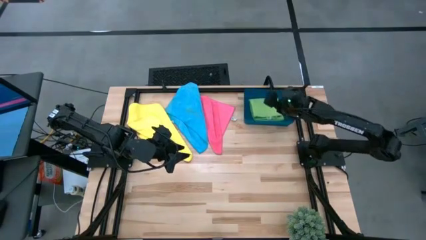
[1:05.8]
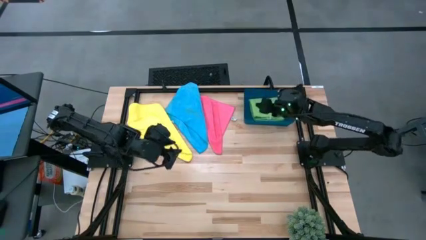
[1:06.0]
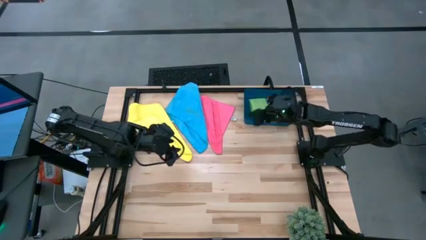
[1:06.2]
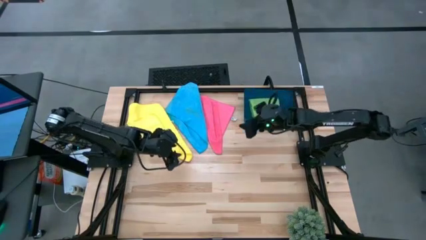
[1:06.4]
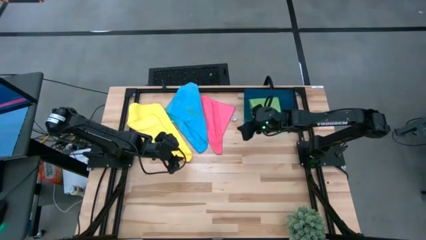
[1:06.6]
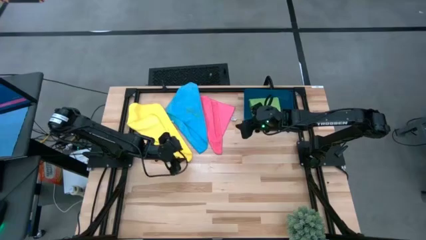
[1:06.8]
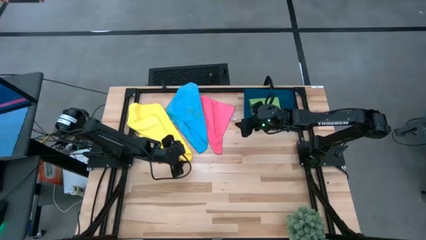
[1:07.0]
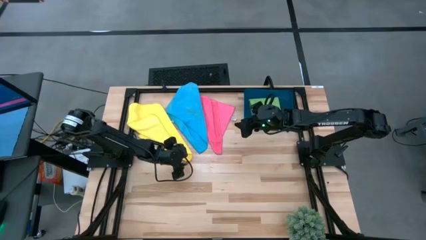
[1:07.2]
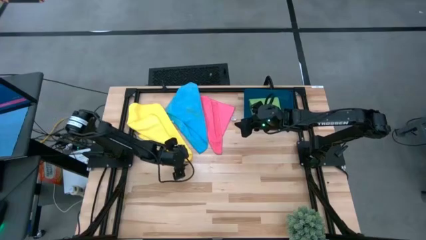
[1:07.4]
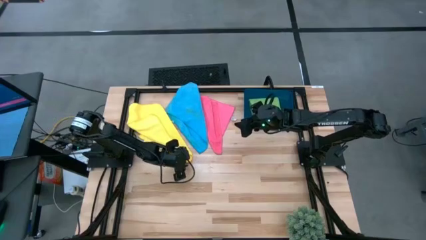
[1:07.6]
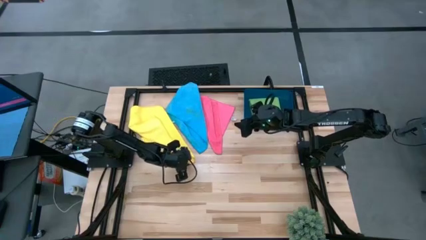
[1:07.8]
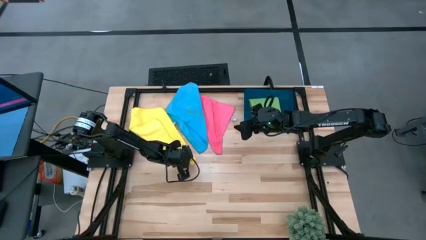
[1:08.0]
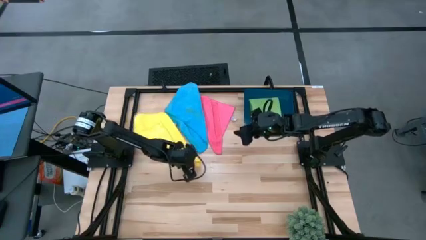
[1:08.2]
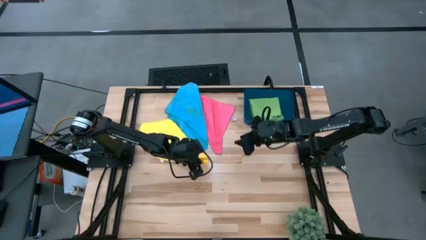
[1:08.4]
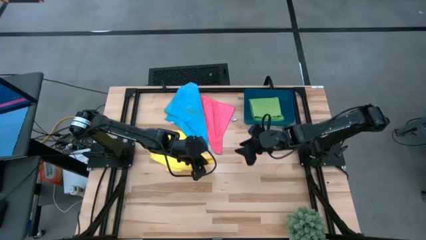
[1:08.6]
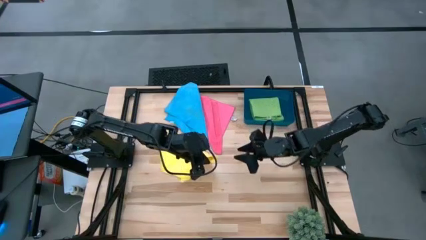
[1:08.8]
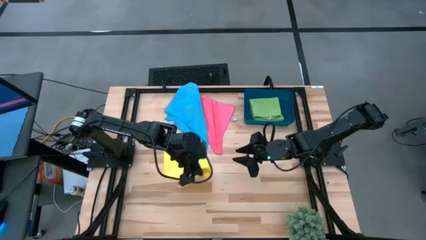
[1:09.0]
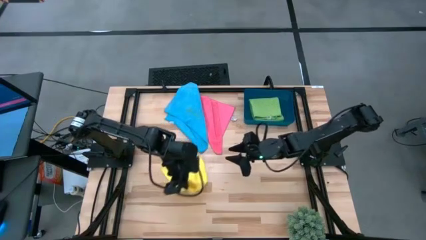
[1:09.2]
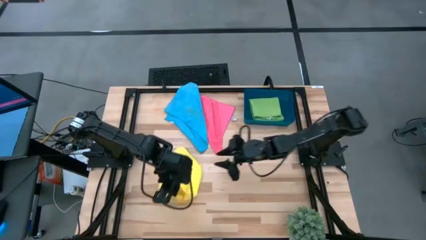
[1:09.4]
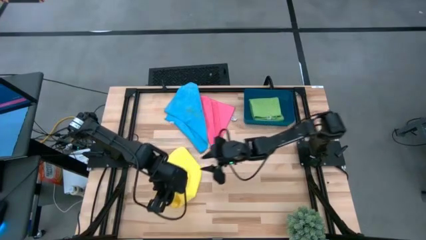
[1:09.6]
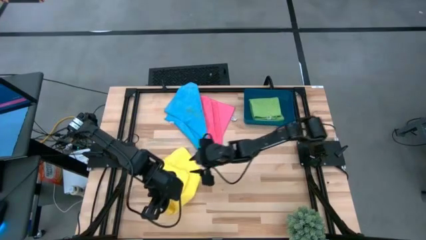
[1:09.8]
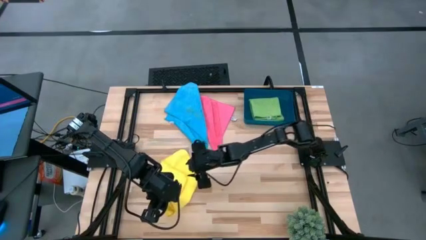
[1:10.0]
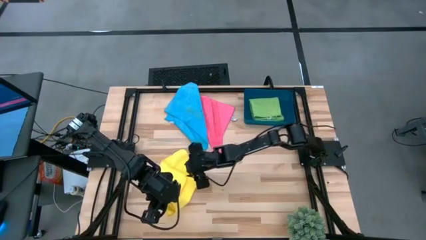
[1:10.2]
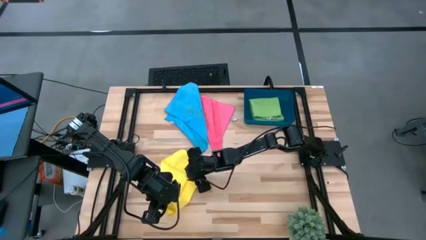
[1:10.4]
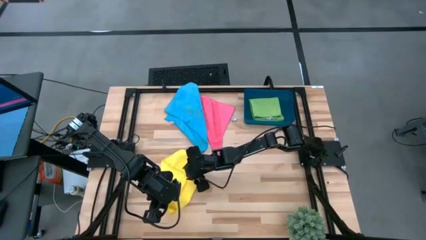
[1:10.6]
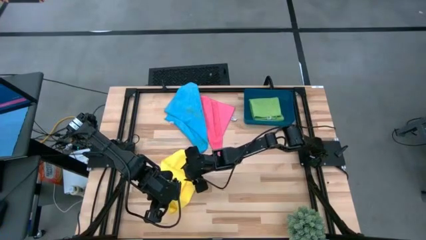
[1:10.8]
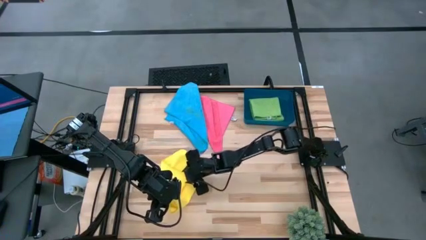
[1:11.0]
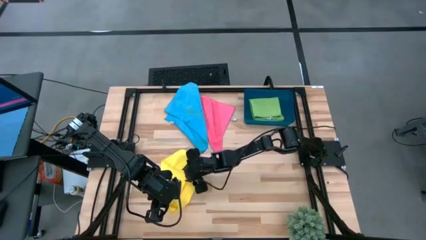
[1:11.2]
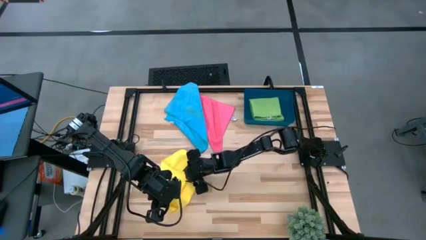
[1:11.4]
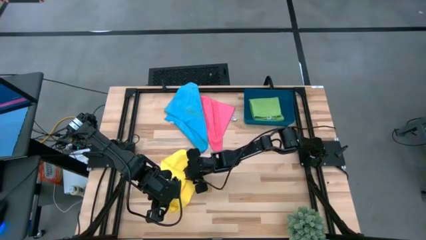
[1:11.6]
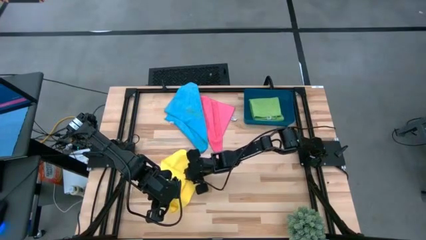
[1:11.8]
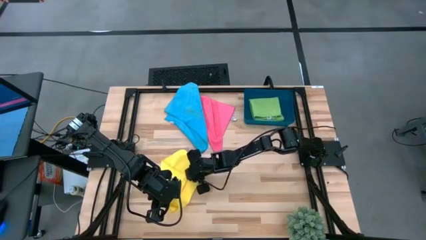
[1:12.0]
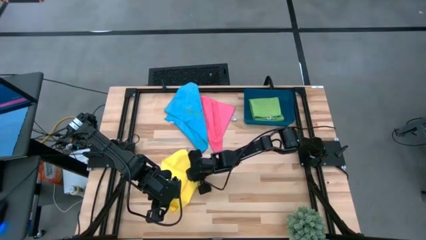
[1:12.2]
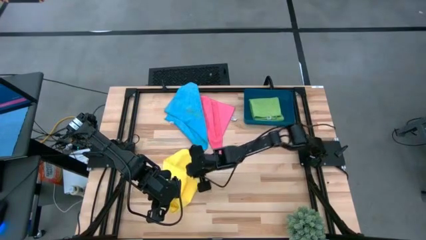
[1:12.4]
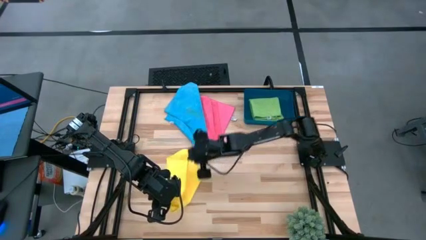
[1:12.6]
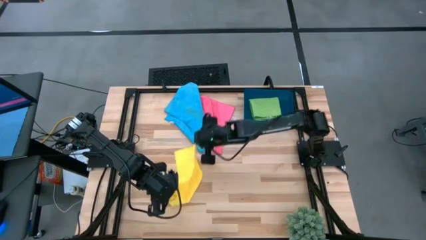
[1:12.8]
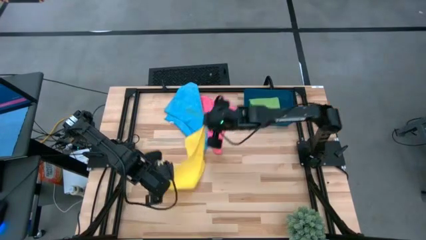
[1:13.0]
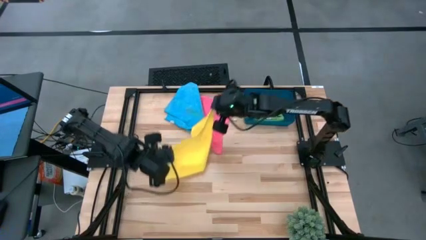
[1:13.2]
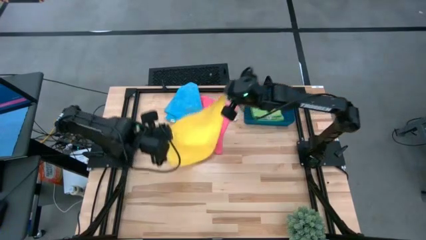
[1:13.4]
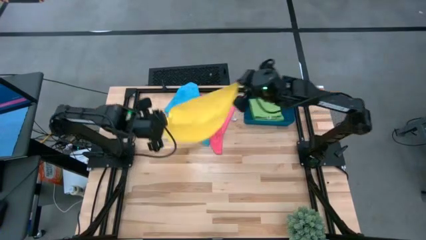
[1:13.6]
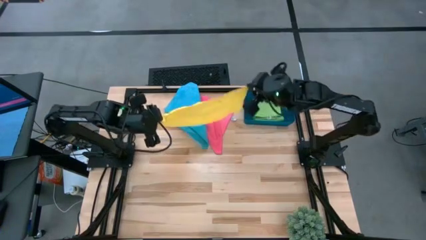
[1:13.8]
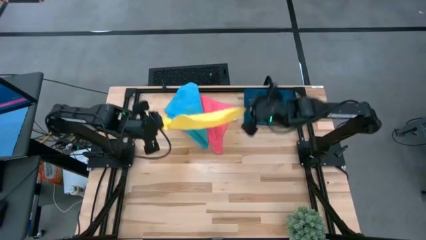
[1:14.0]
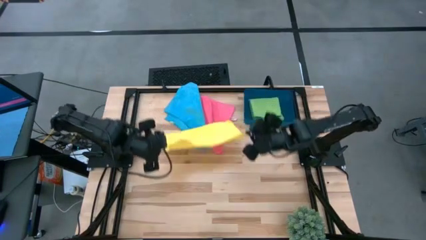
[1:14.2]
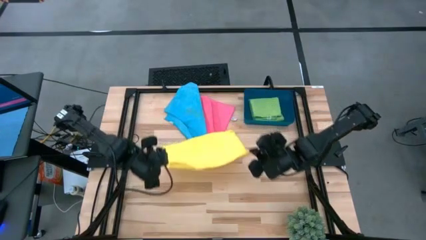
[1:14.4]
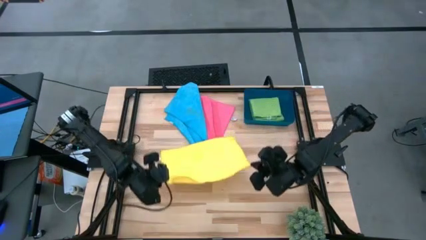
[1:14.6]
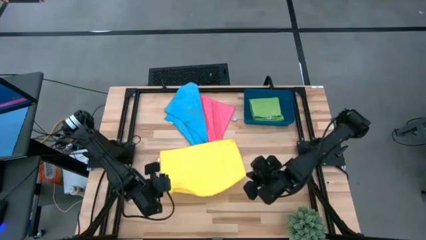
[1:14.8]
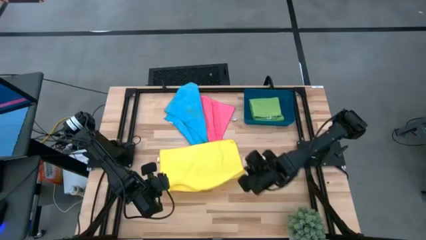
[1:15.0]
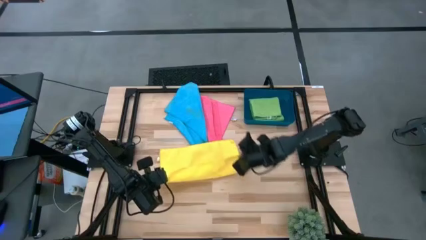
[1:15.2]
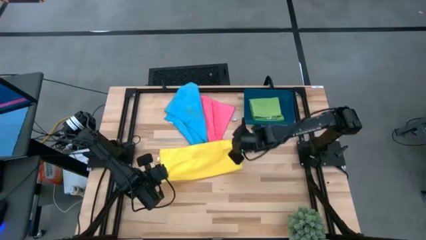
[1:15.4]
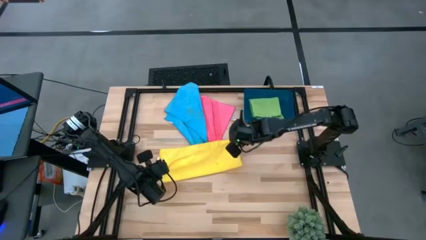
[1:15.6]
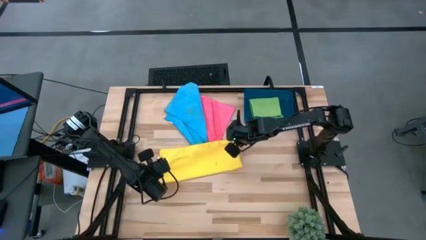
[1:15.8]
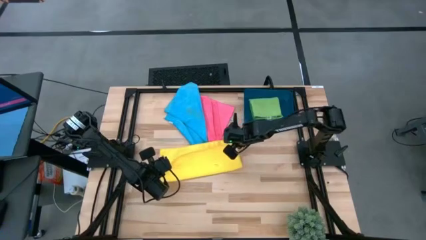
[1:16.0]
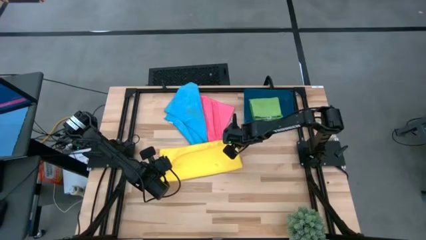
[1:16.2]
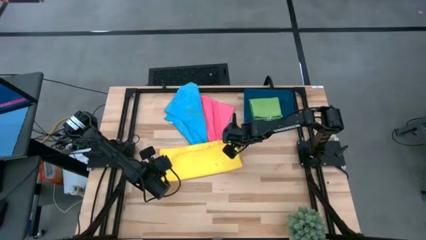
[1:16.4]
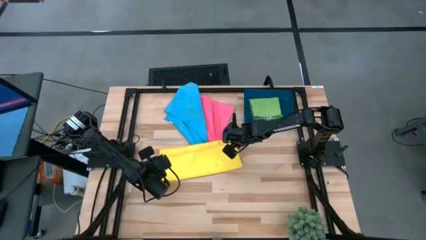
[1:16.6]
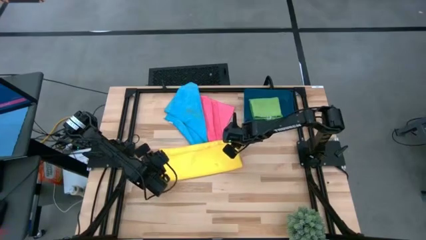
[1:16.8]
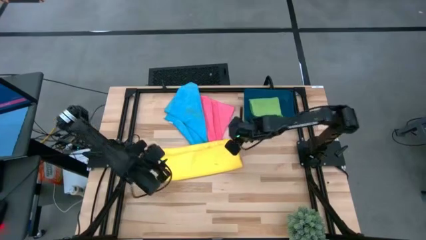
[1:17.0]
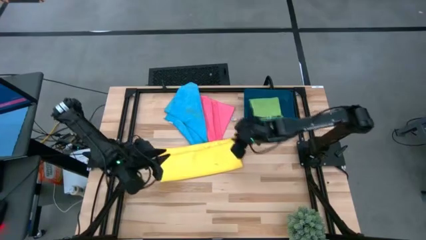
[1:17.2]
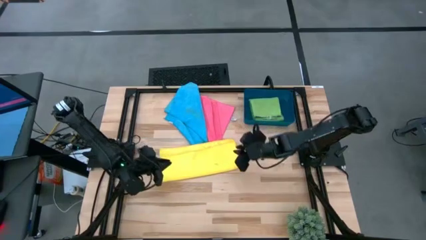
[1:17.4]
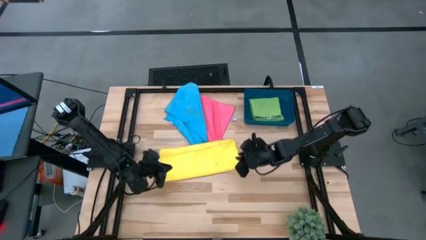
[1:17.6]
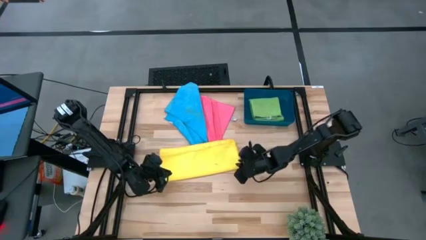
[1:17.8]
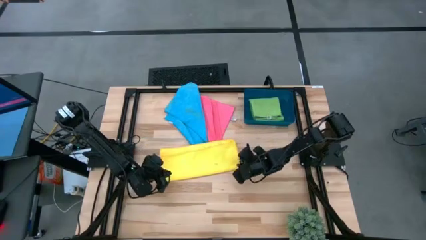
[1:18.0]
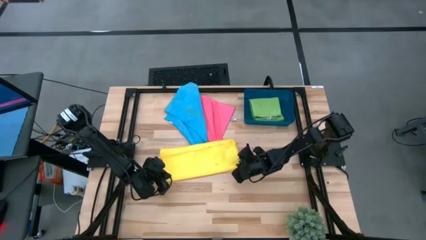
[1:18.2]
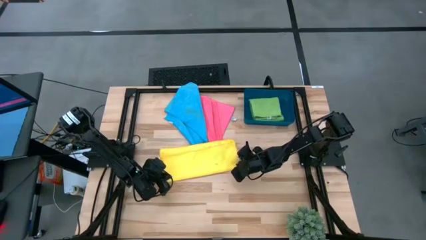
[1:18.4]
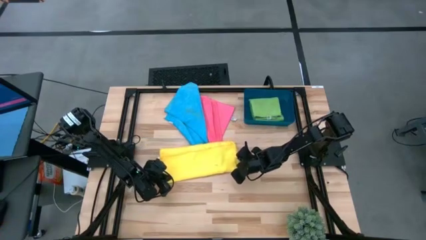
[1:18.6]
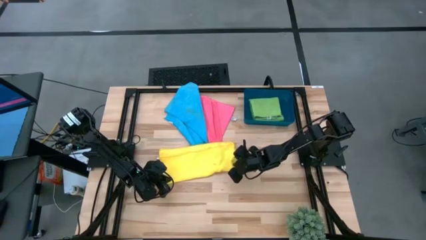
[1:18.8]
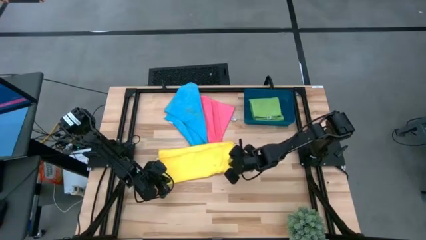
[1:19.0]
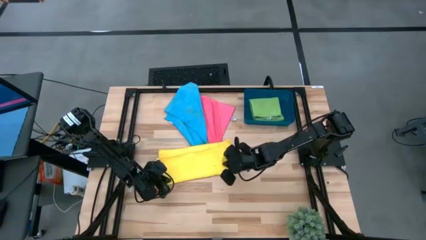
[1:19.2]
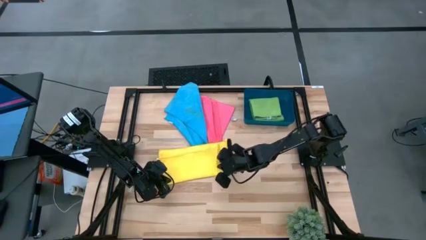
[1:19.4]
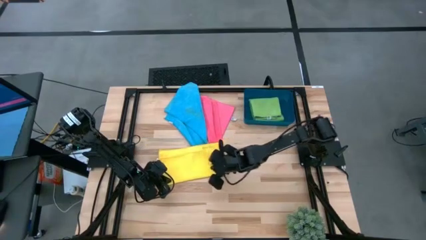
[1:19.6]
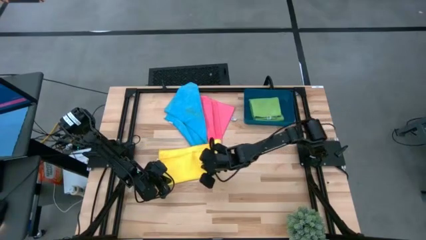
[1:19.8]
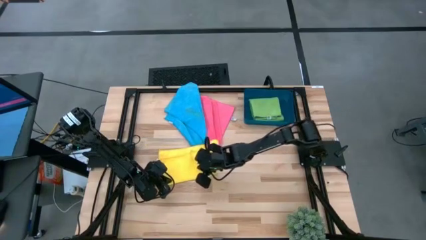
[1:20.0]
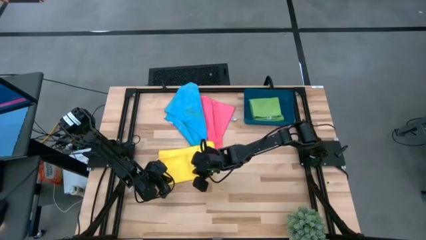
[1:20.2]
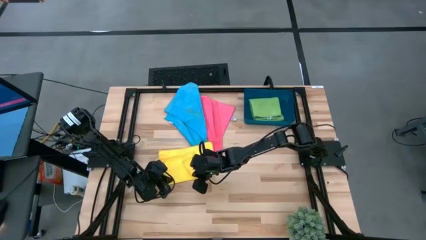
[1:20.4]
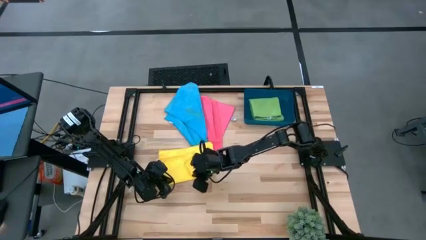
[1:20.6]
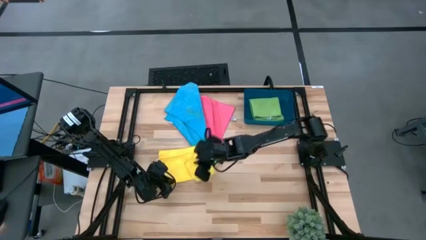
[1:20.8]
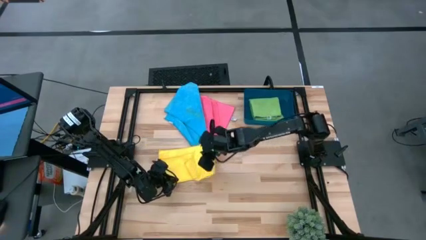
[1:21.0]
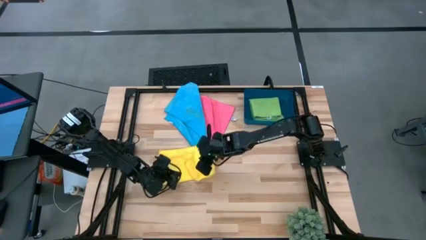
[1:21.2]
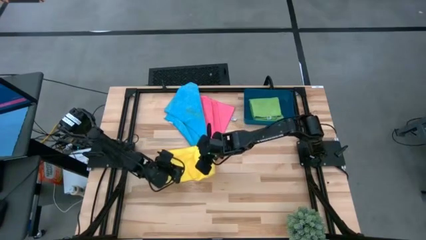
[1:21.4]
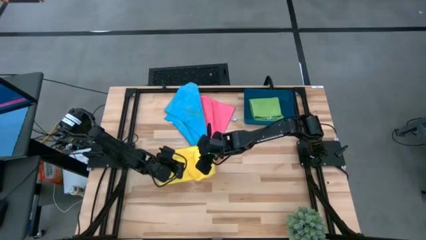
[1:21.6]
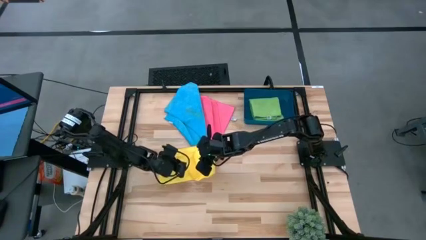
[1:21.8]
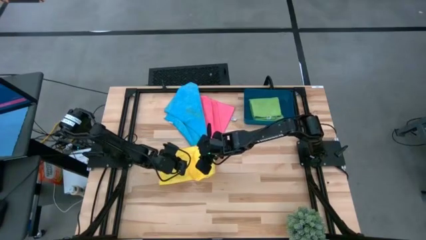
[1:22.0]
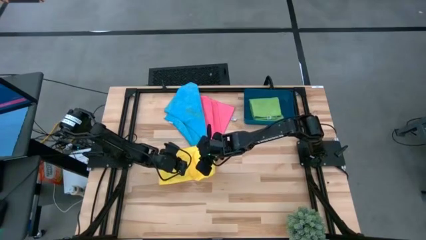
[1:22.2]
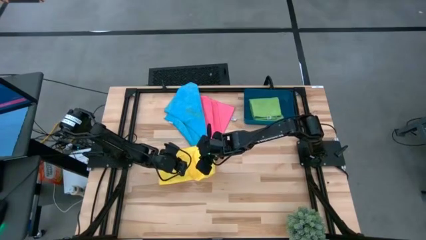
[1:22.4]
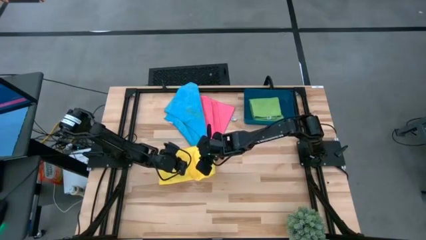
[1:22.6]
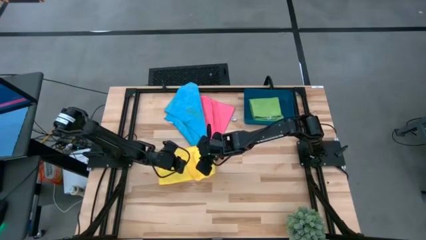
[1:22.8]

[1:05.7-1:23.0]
Task: Fold microfiber towels
Fold the yellow towel
